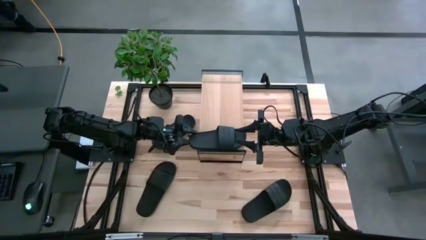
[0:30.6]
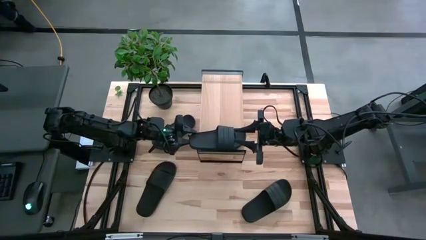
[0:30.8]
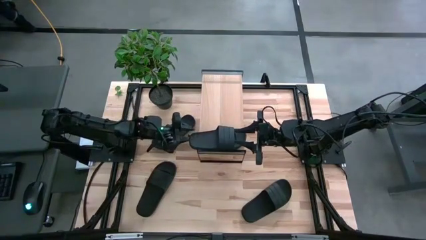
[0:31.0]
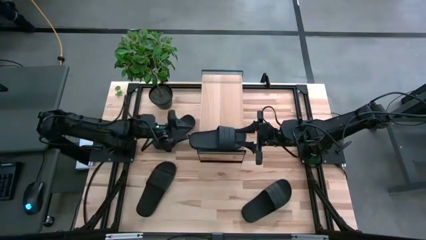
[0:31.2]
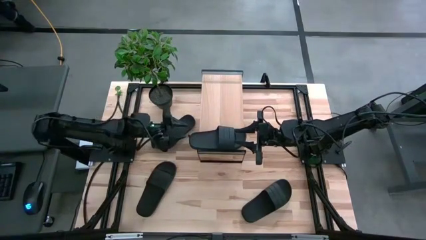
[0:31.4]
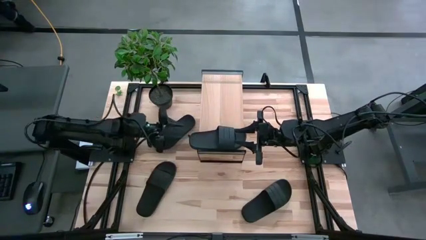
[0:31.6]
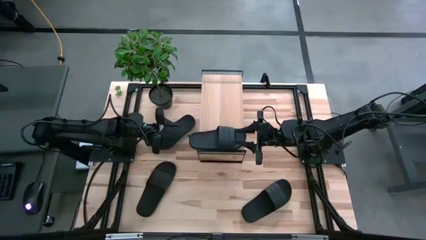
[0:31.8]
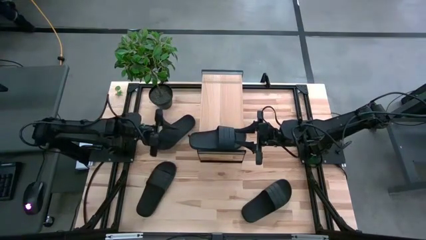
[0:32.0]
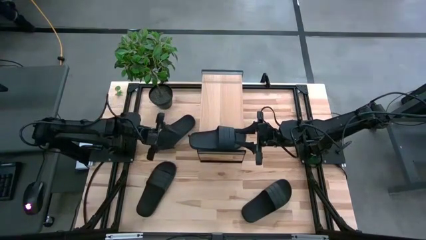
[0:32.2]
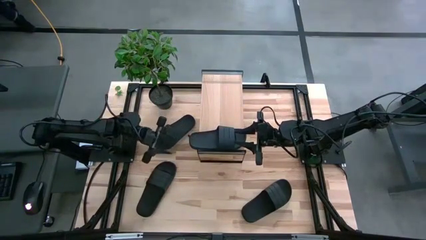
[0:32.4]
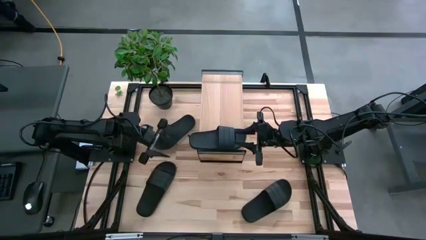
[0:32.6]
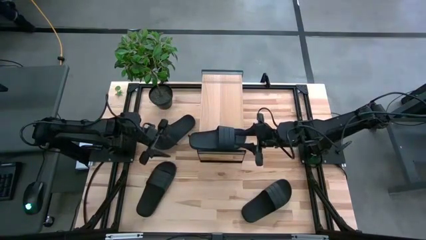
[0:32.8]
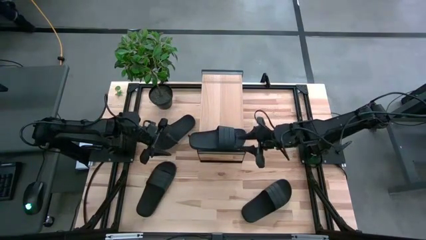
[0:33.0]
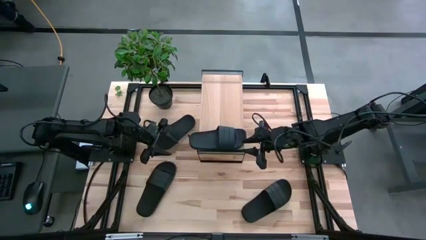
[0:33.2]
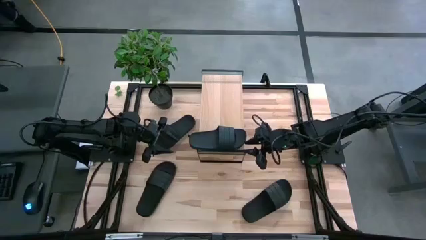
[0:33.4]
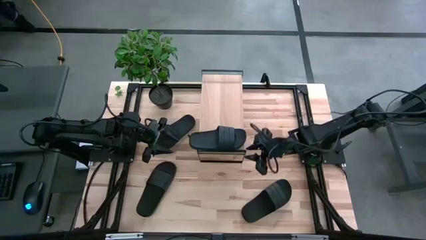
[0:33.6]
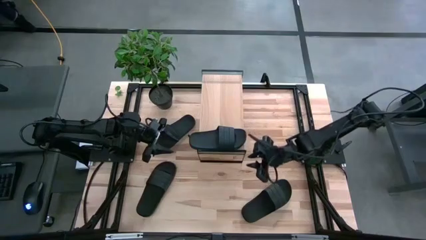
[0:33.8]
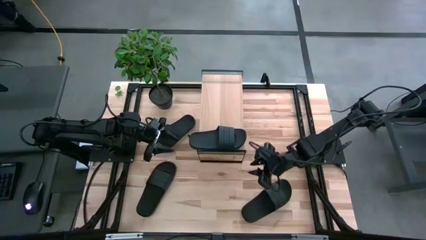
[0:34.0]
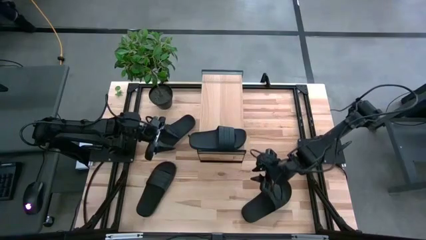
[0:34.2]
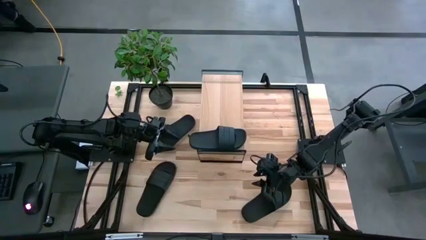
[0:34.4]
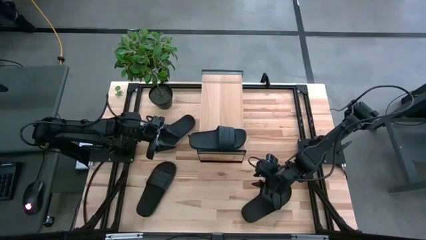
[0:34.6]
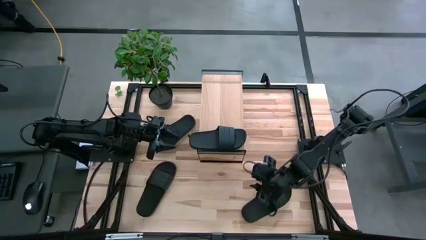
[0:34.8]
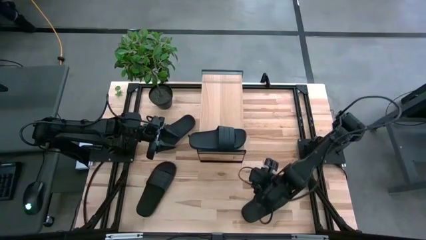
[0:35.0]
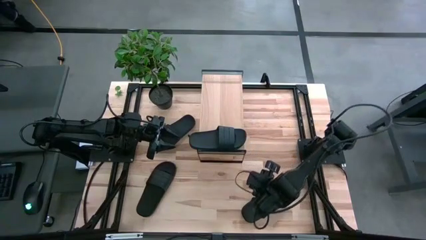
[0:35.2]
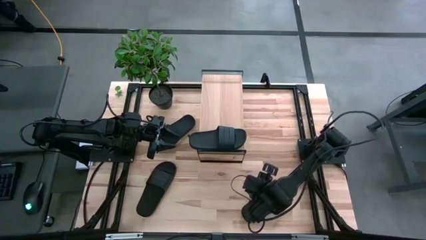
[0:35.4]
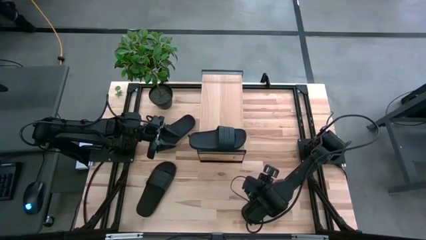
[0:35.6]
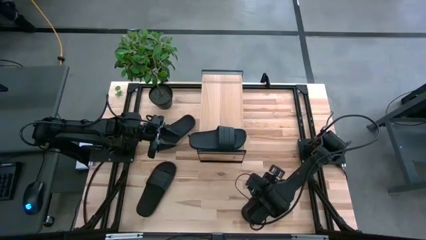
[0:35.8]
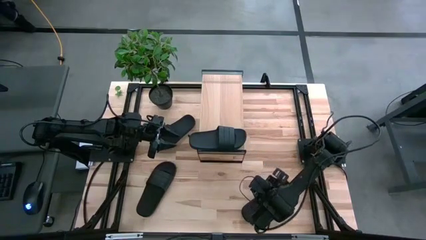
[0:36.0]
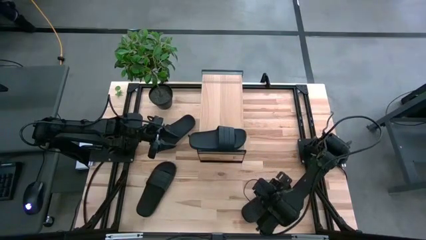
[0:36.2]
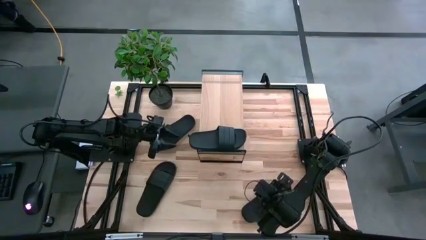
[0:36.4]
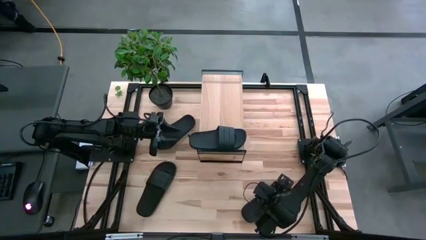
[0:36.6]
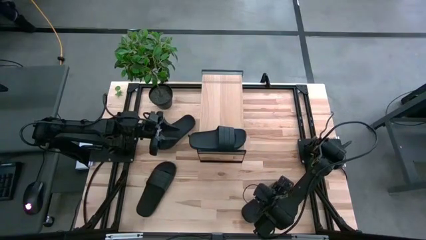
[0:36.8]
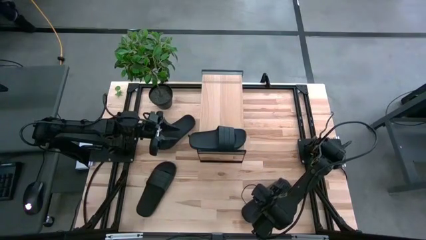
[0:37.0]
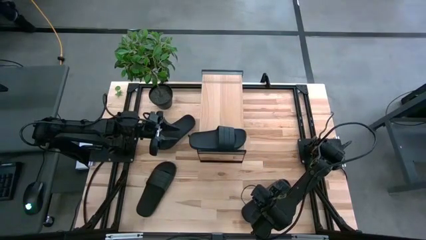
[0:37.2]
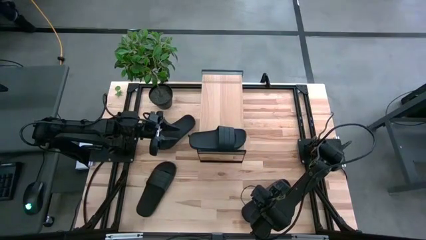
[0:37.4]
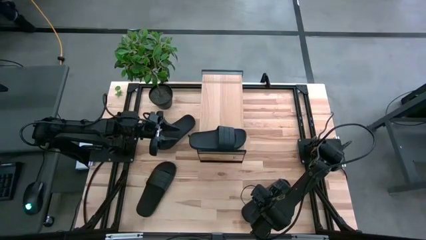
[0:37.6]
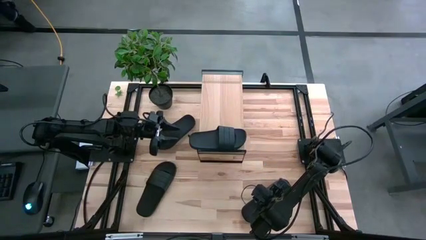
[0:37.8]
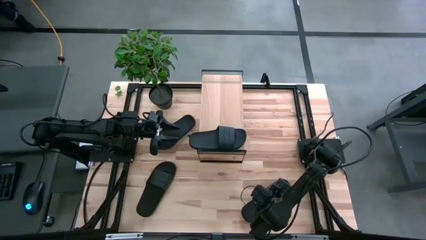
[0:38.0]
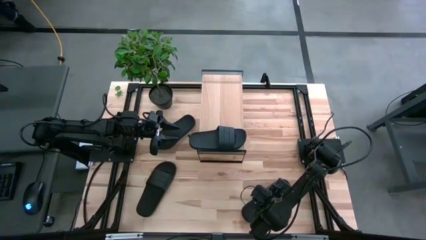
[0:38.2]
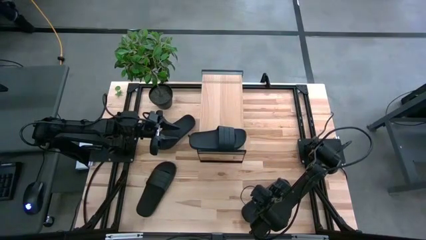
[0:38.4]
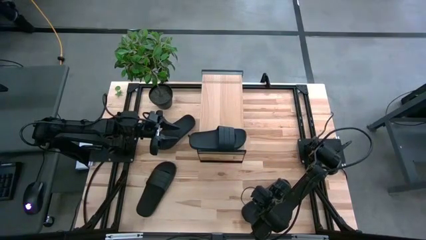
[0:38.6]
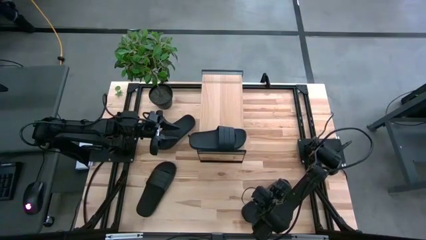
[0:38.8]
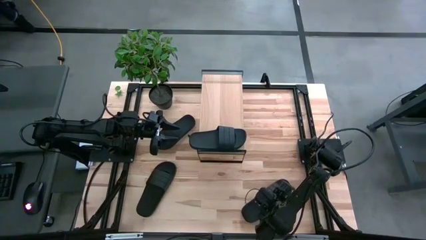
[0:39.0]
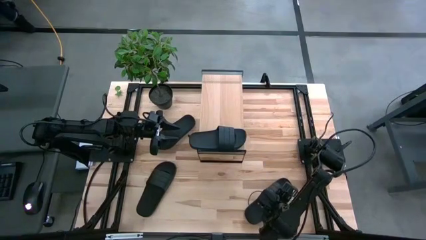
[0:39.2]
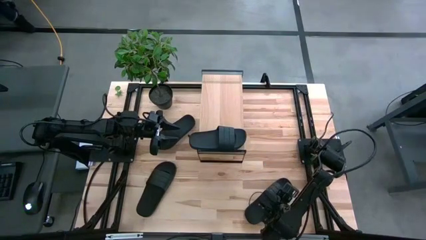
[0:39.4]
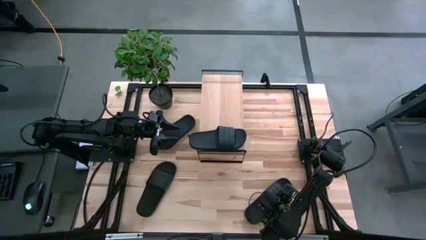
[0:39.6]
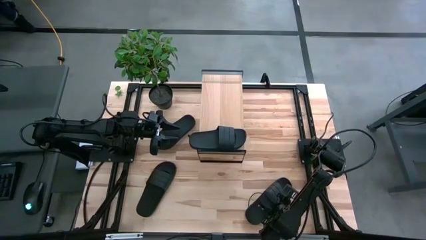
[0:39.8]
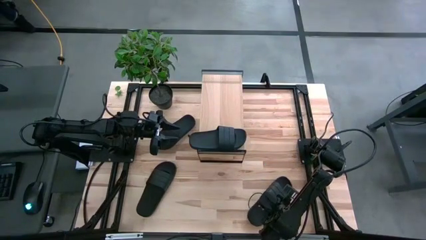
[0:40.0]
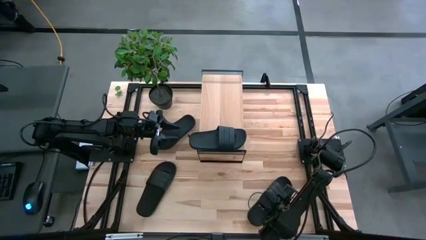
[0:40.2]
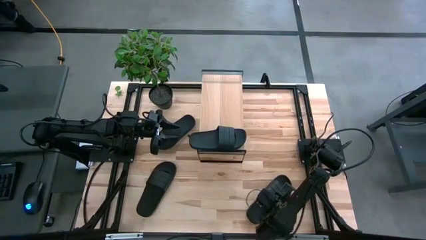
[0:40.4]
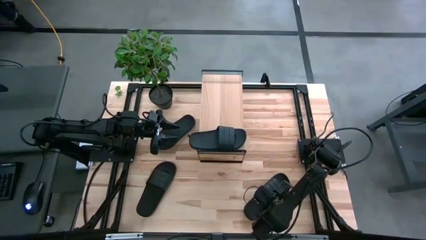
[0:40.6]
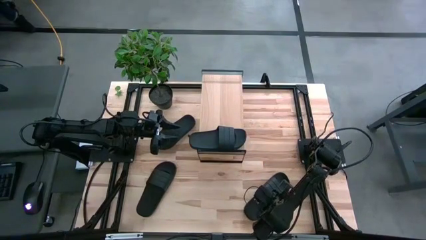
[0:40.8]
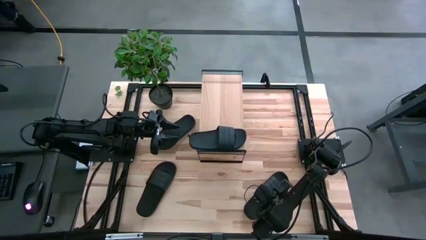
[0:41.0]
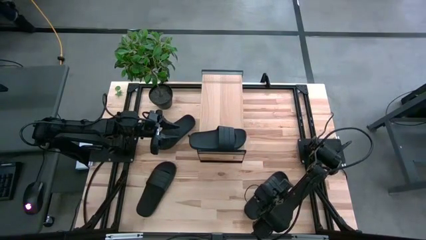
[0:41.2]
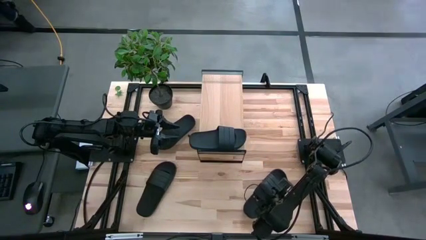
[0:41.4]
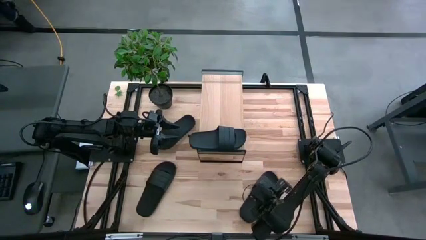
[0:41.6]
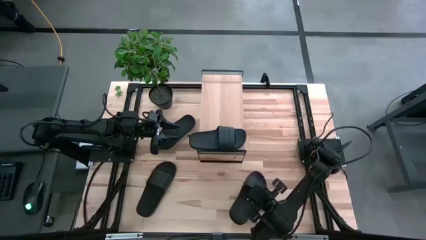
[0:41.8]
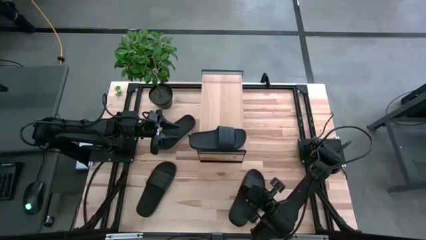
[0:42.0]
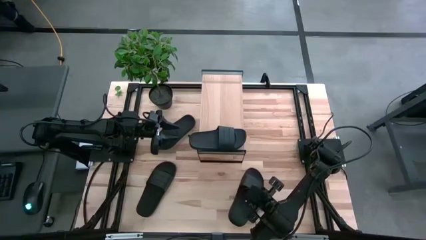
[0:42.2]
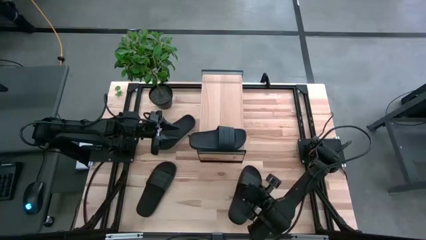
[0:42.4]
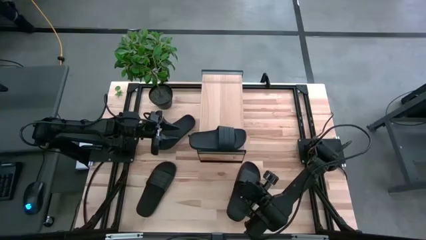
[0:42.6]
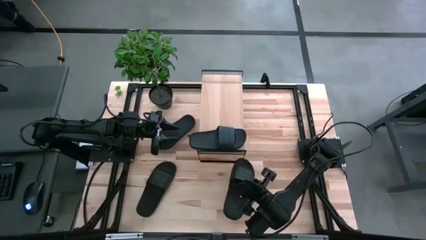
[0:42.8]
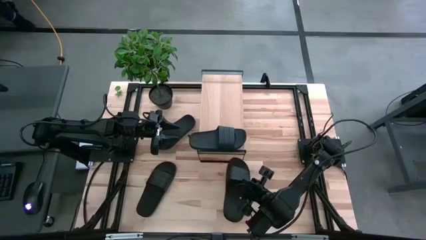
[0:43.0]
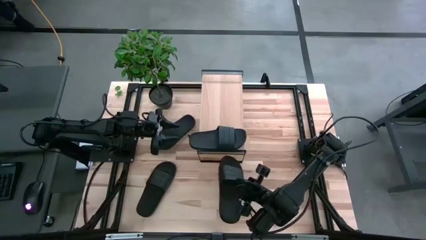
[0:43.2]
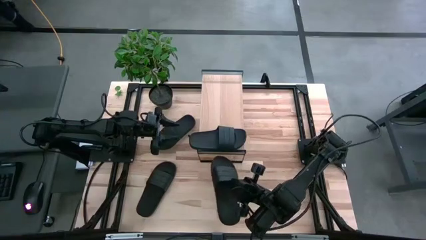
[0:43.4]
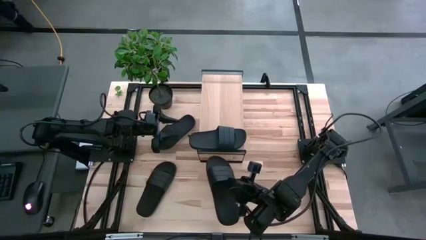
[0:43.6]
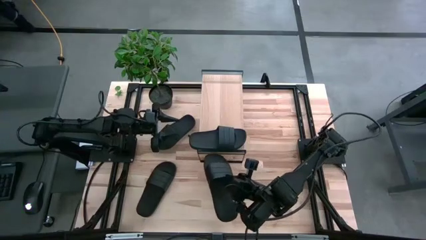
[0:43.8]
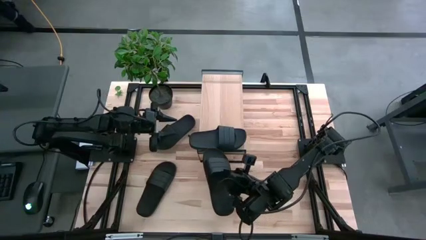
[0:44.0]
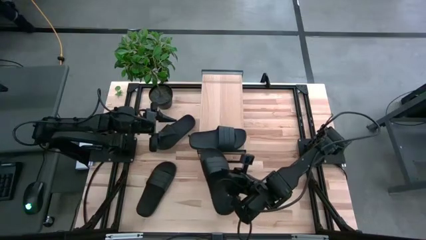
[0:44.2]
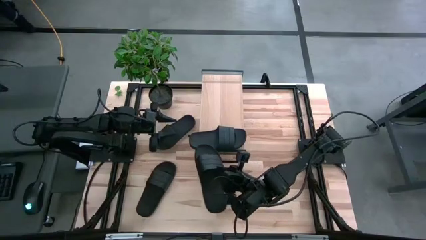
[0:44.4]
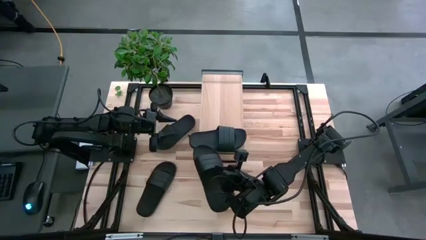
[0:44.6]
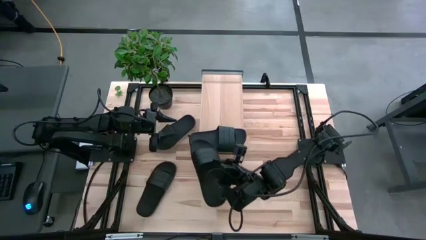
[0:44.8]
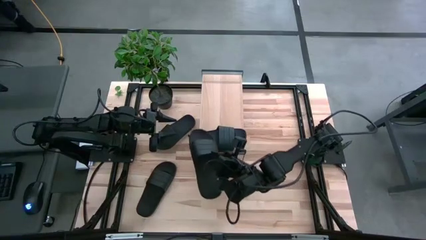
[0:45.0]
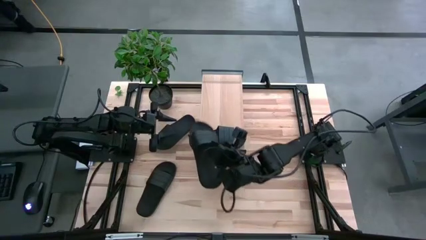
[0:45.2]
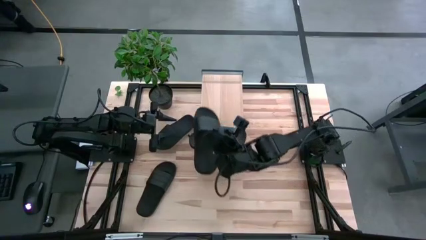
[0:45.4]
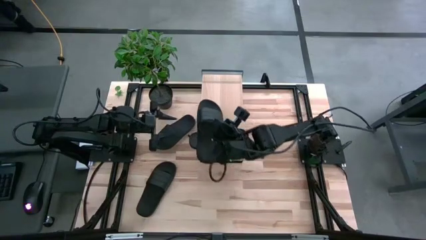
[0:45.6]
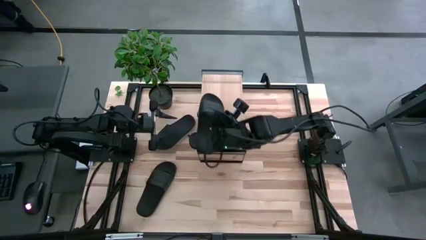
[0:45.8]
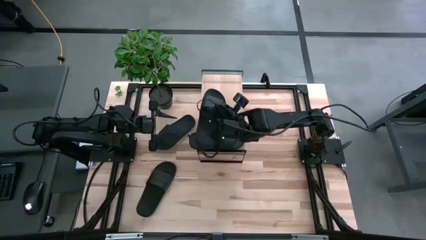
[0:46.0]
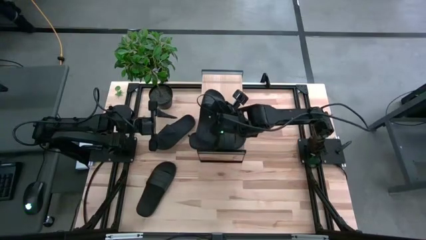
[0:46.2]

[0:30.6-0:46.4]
Task: Pick and place slides into the shelf
Put the bottom right black slipper on the shelf
